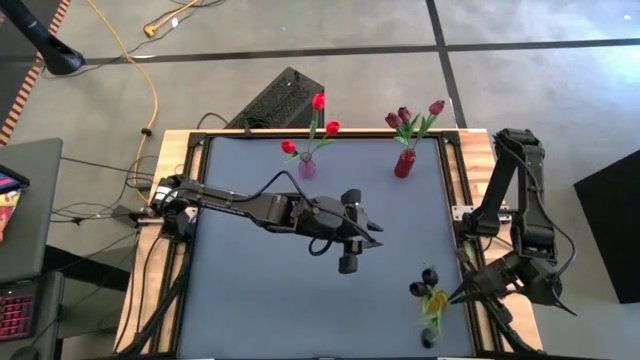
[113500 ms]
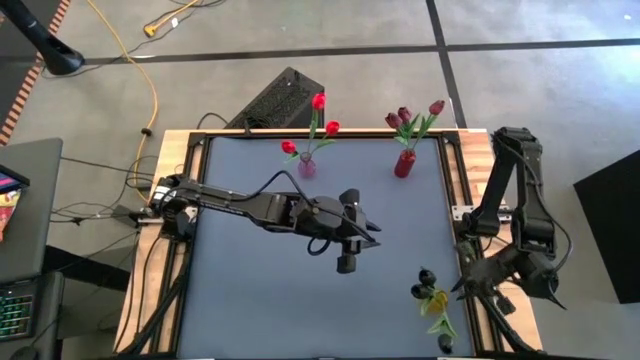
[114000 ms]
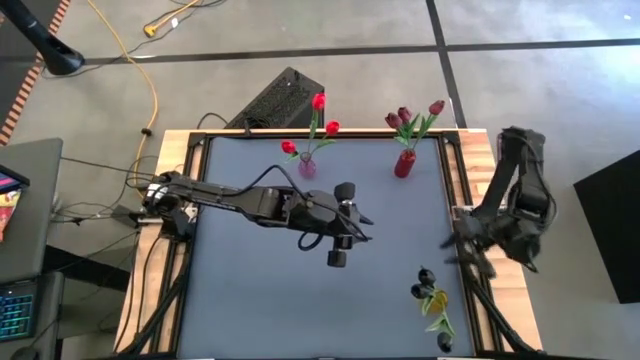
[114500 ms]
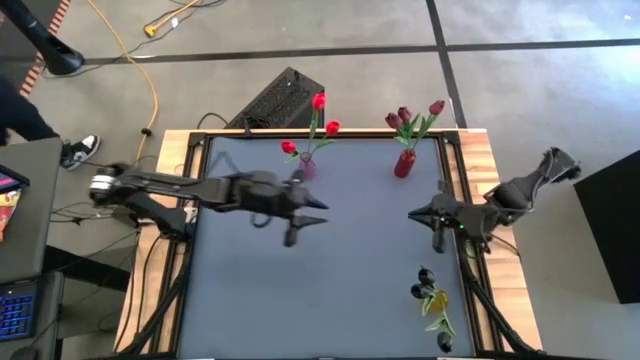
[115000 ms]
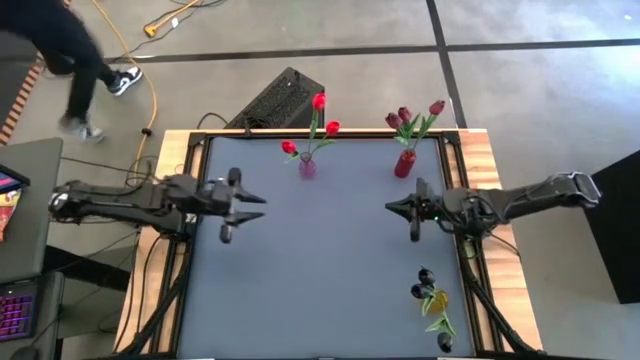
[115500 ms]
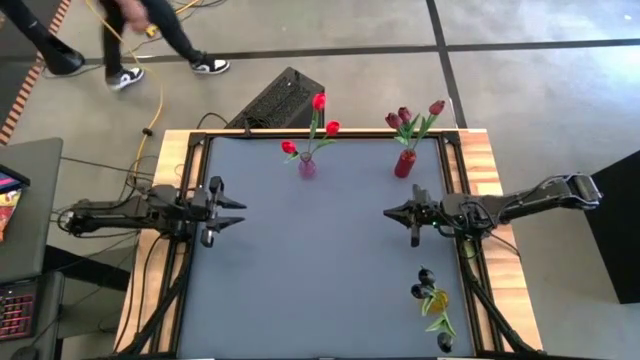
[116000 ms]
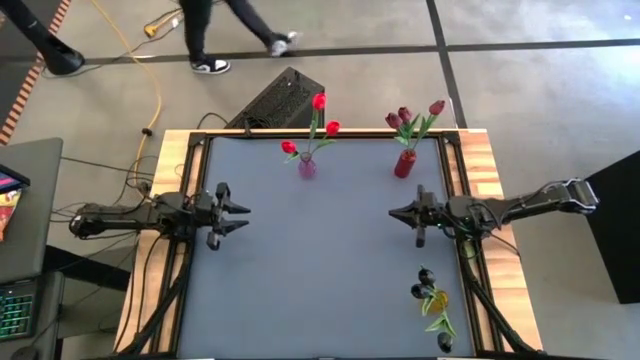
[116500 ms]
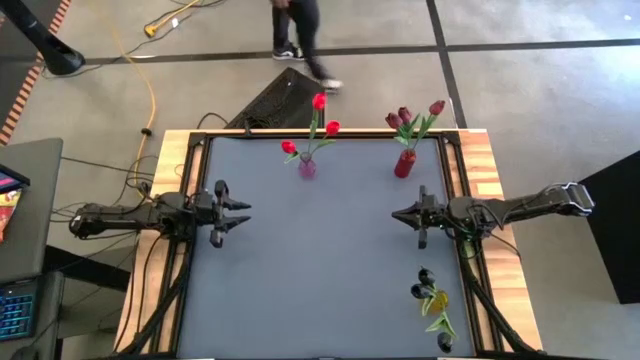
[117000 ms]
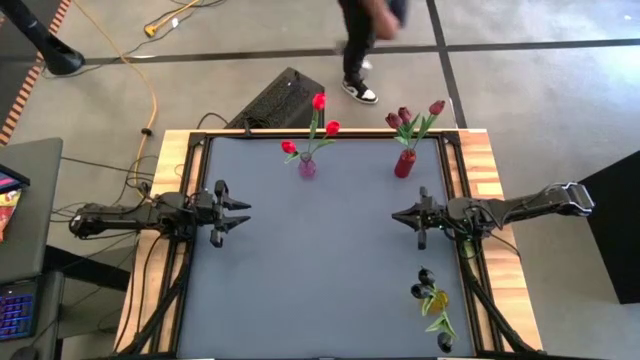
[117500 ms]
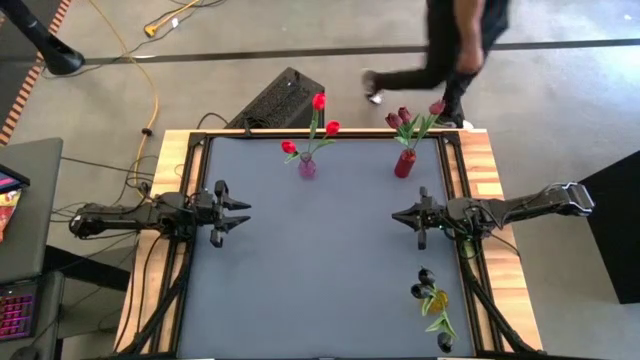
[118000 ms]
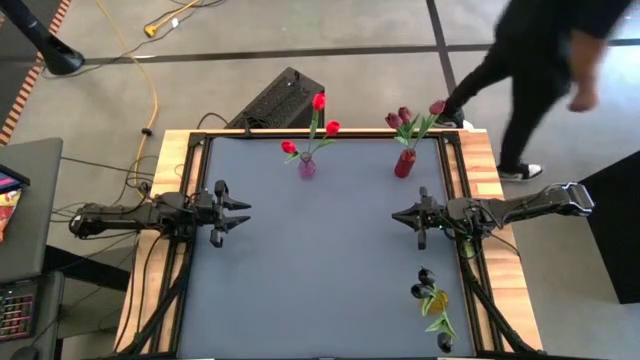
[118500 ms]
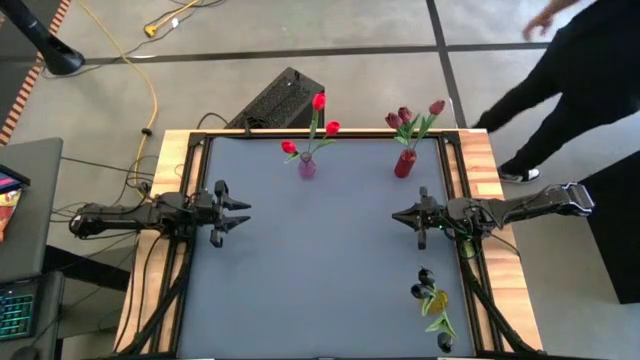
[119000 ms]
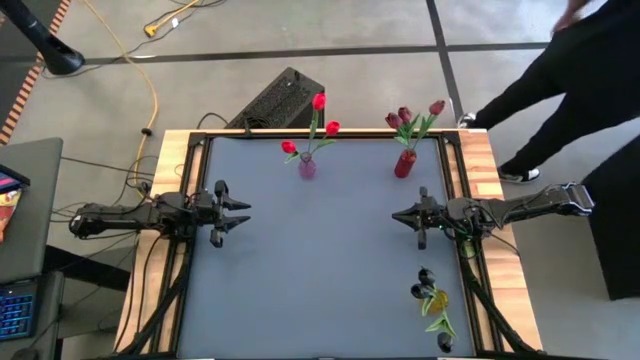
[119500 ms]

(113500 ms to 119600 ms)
Task: Sort flowers into vase by color
Return to Home Position

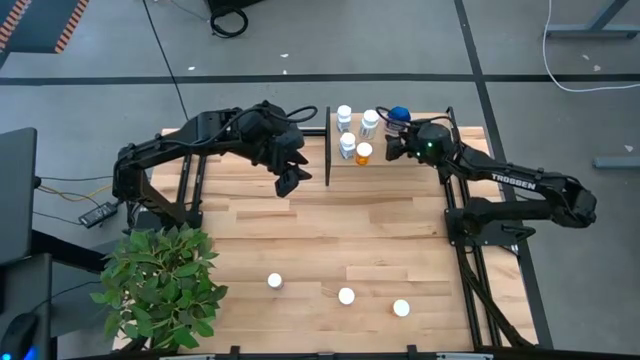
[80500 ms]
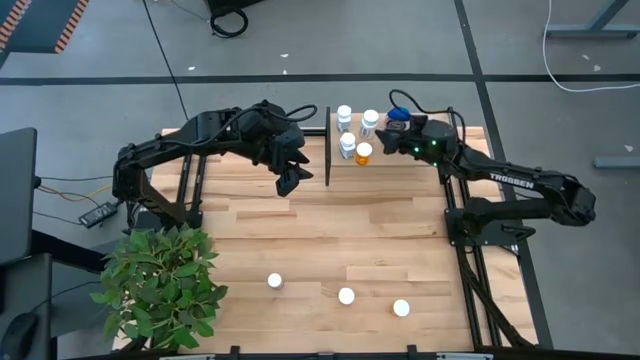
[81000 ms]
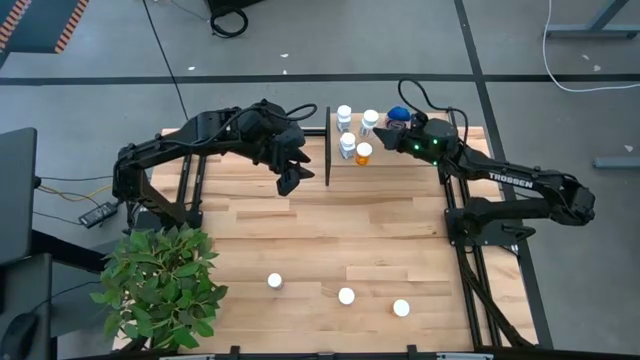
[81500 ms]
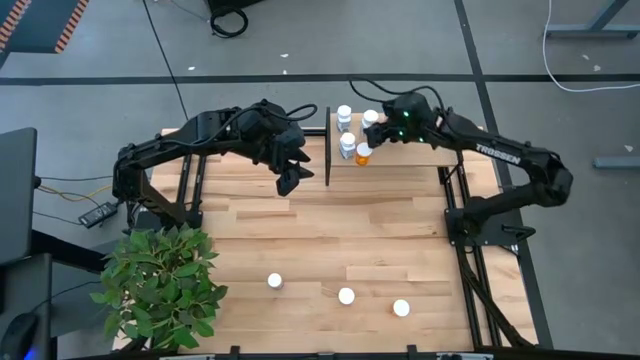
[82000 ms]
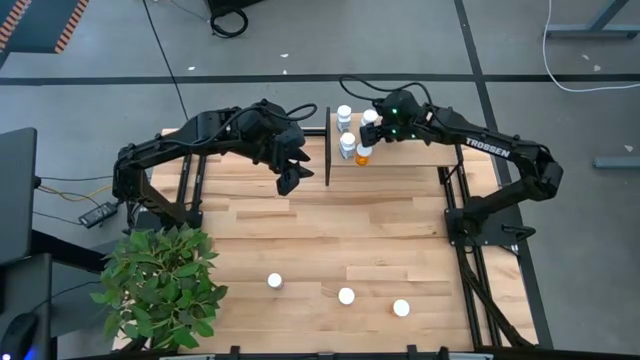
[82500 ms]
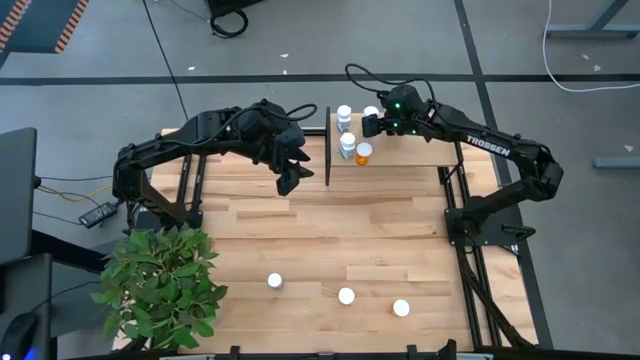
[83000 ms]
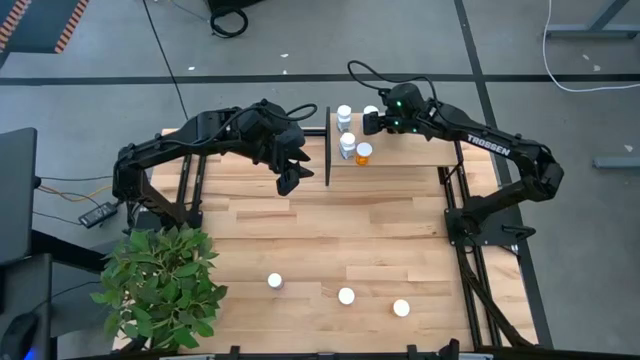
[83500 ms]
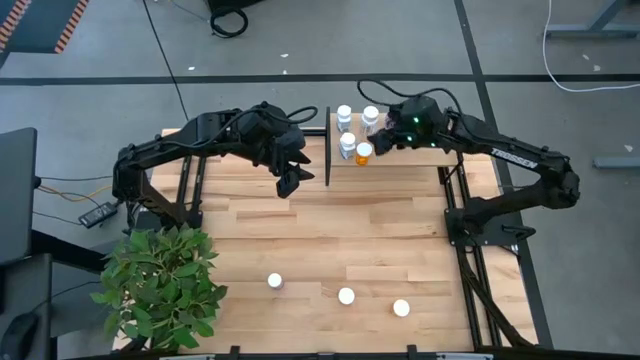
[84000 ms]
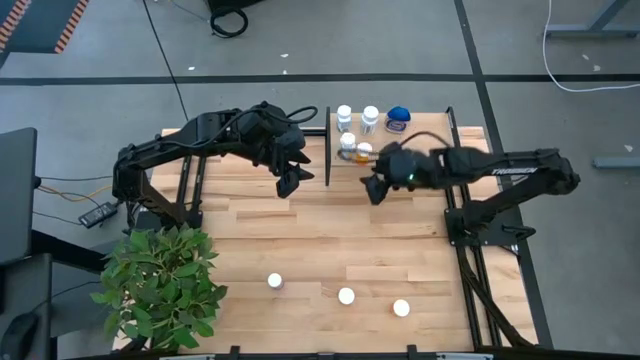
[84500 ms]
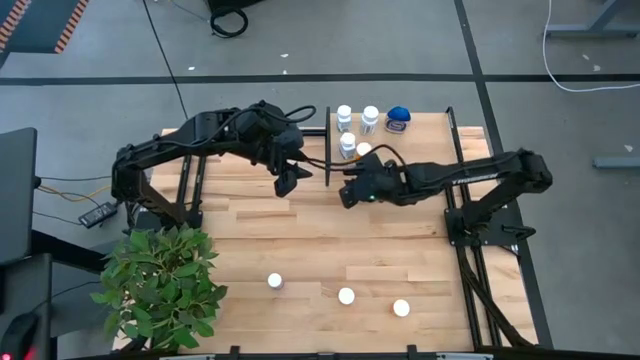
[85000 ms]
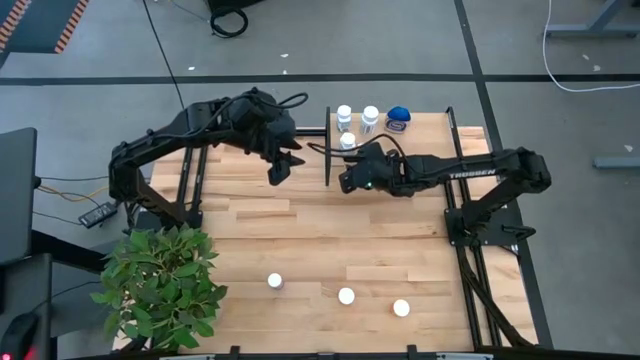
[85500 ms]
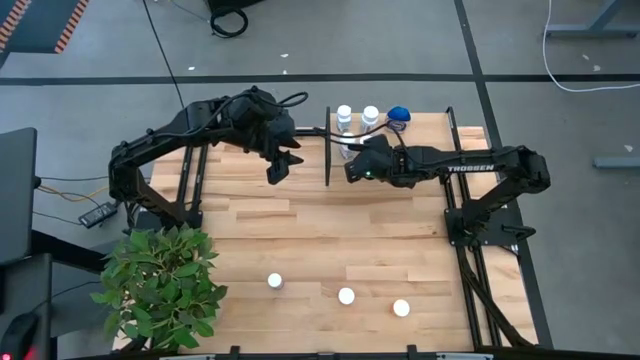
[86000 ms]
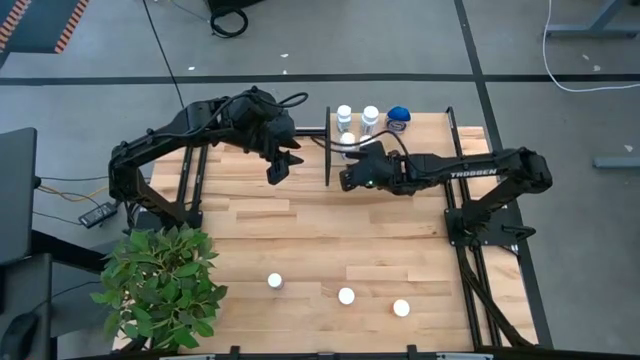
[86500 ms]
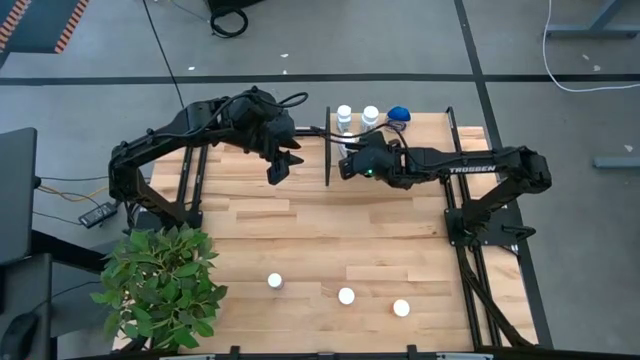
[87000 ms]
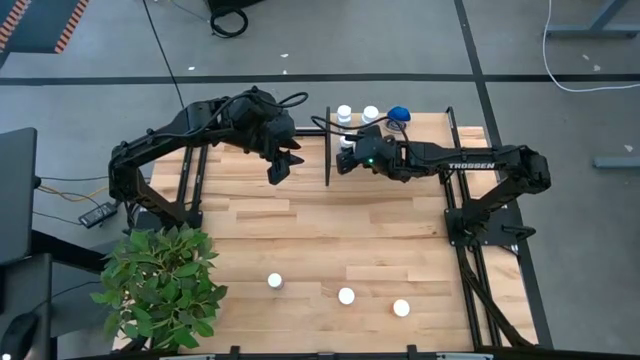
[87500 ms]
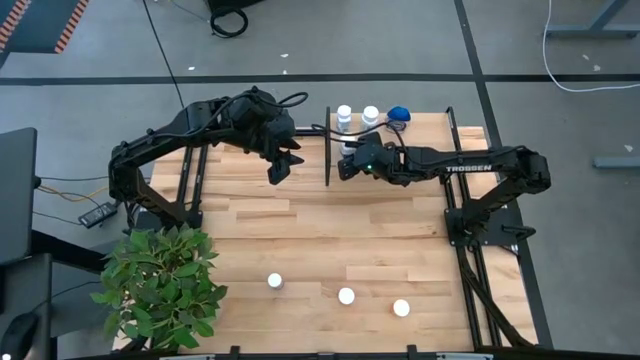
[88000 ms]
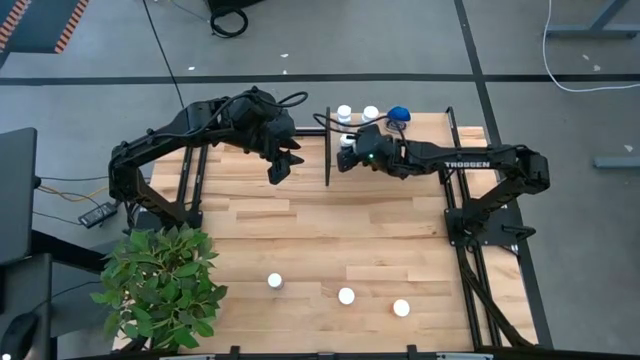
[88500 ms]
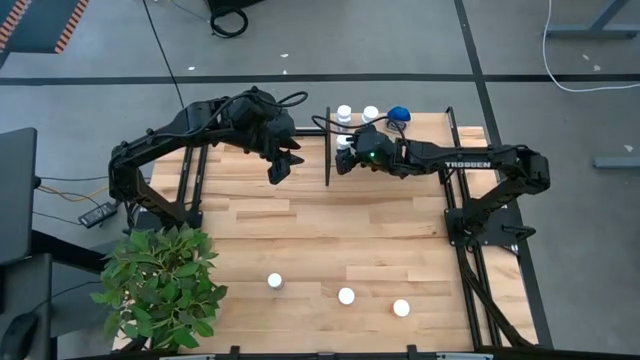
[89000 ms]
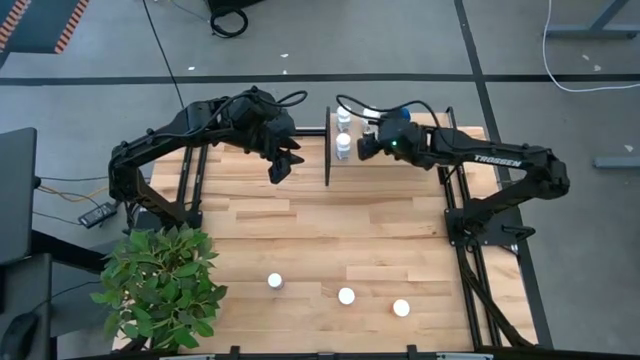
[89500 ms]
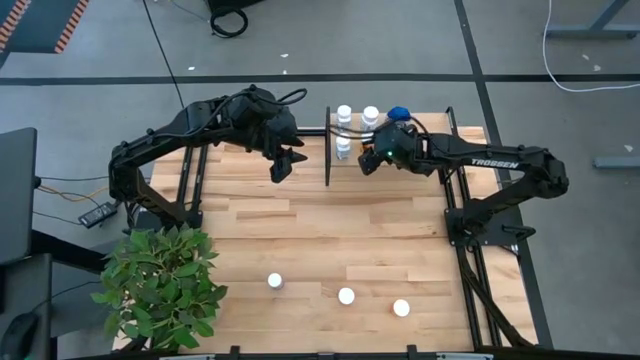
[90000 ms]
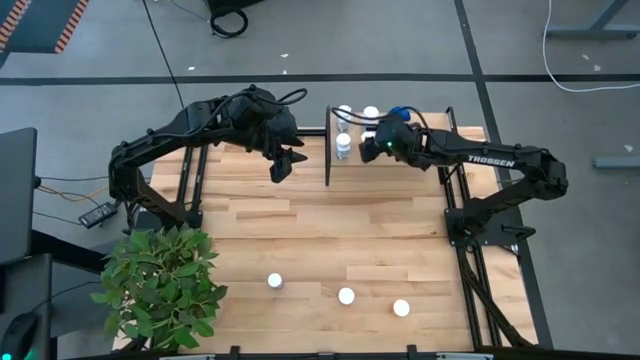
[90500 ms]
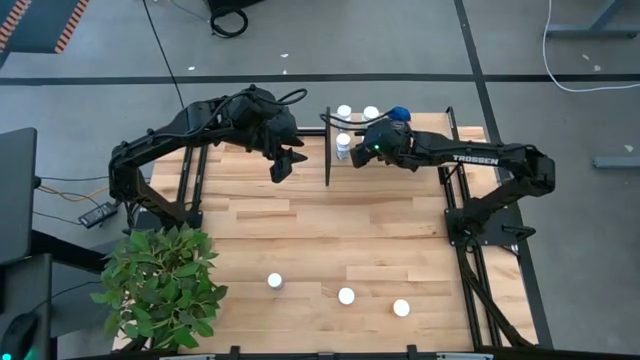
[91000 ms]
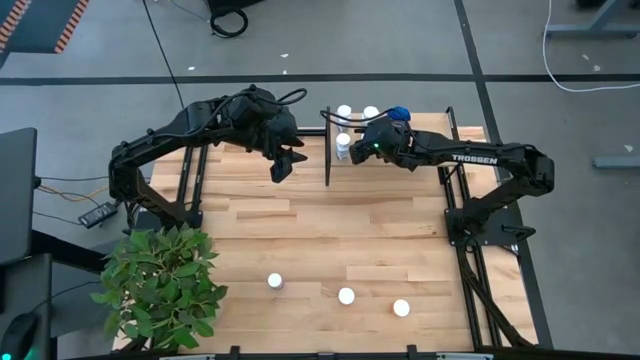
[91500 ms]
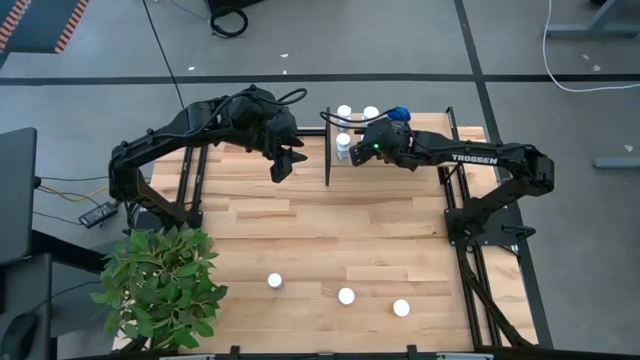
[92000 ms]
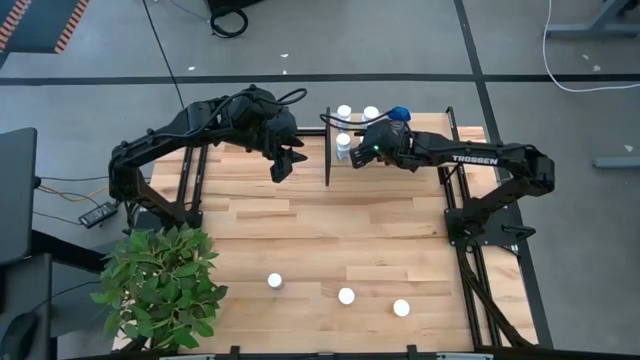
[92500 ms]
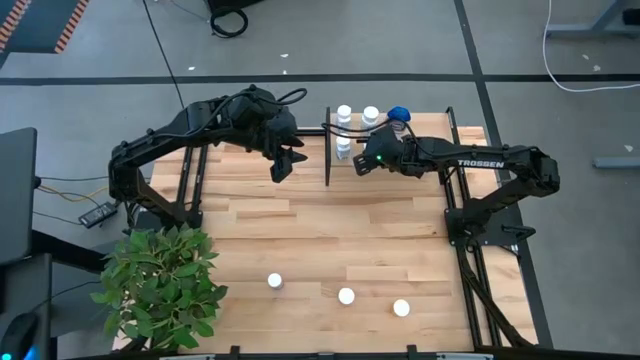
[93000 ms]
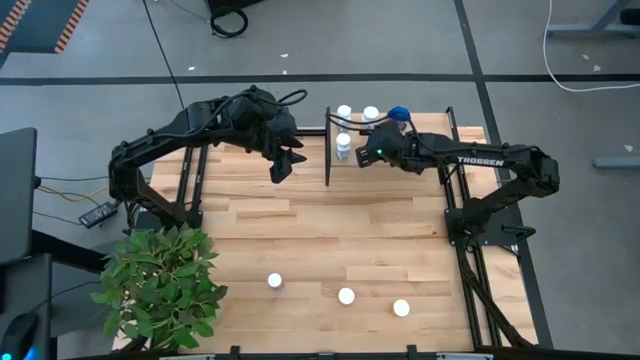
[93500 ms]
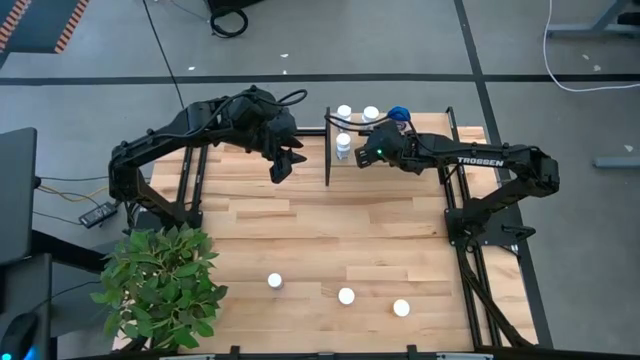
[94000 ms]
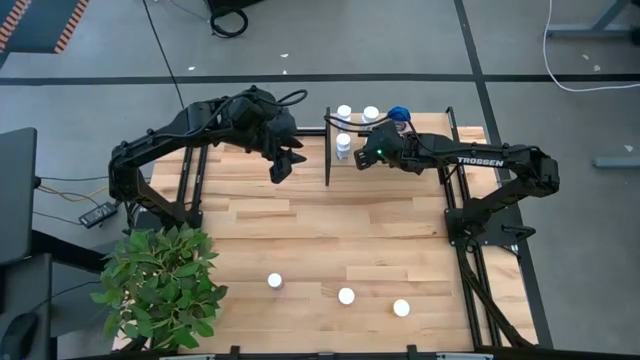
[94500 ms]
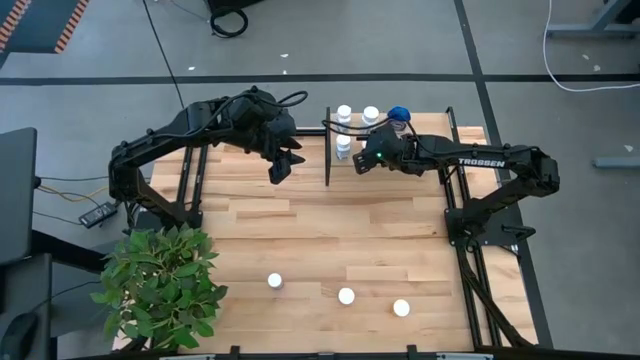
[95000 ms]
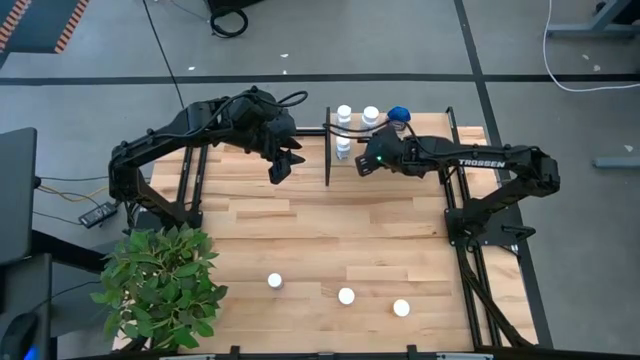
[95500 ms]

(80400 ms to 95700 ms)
Task: Pick and place medicine bottles onto shelf by color
Adjust the medicine bottles on the shelf
